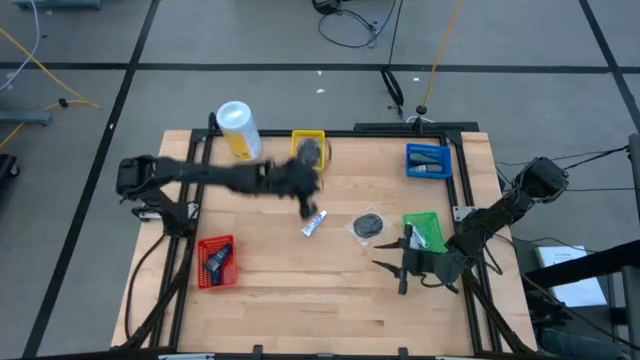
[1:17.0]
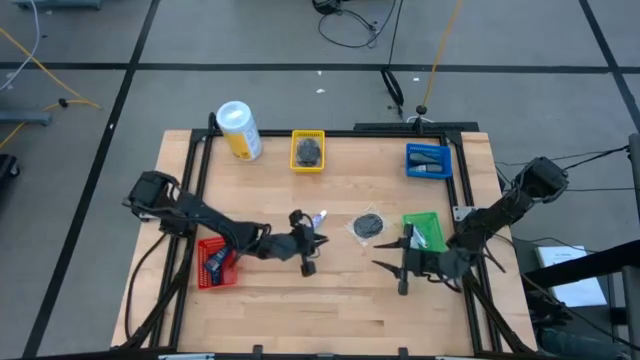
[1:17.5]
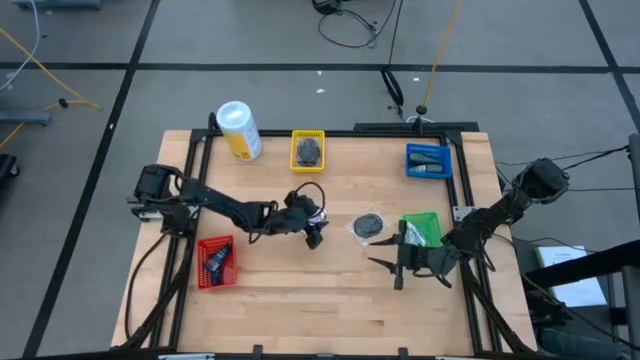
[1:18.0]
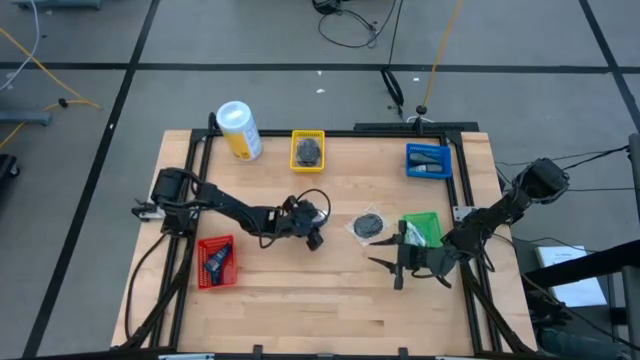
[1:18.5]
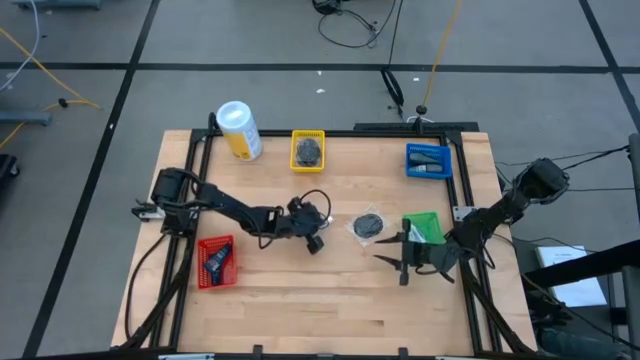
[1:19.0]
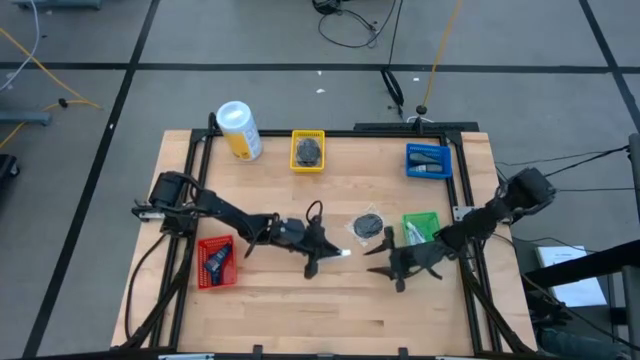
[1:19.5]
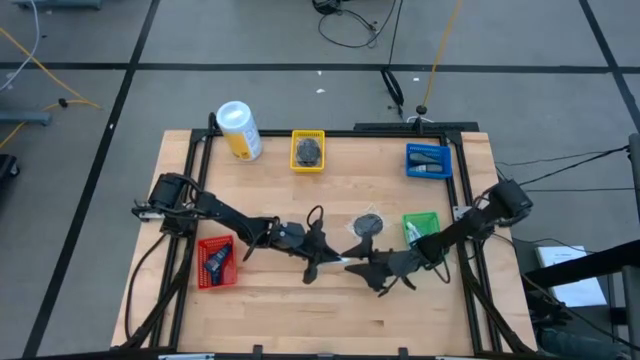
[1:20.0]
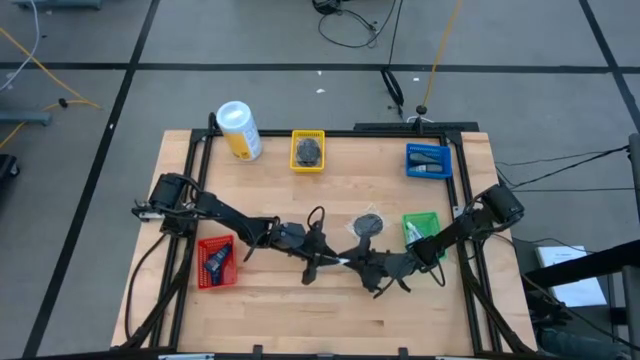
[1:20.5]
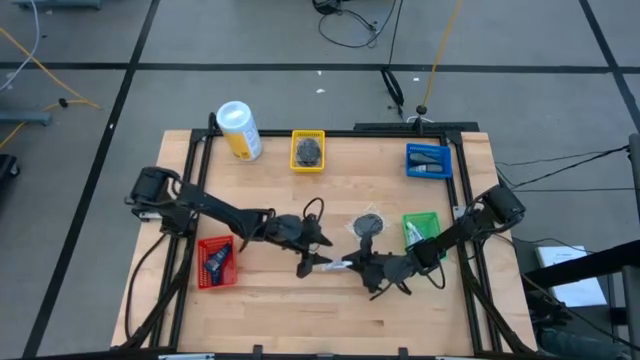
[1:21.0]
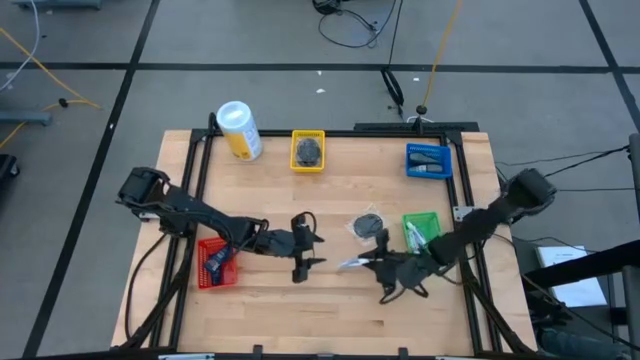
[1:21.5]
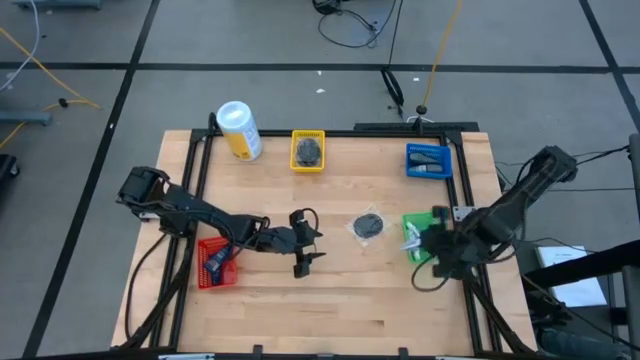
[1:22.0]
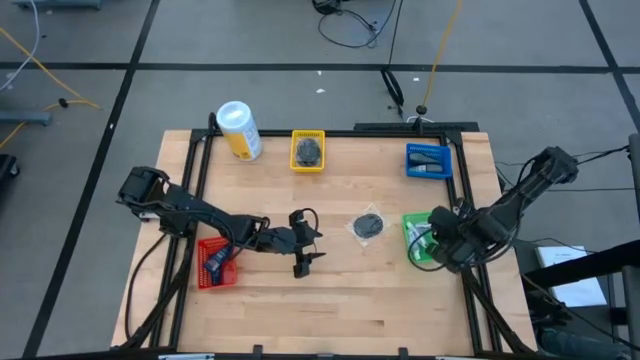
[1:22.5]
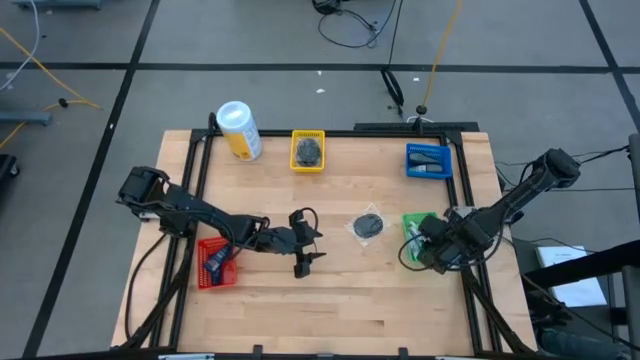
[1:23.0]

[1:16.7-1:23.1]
Task: Pick & Place Travel size toiletries
Put the toothpaste into the green bin

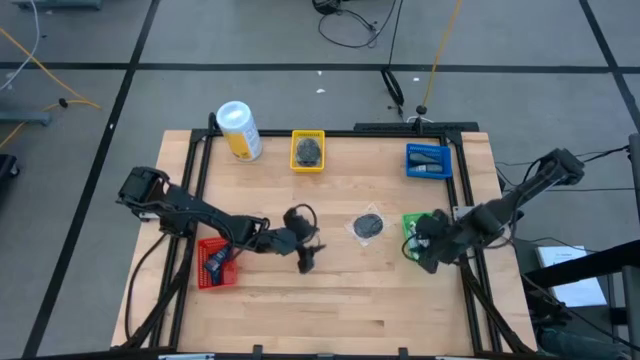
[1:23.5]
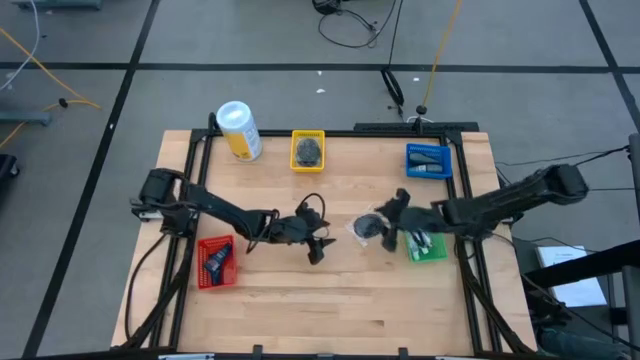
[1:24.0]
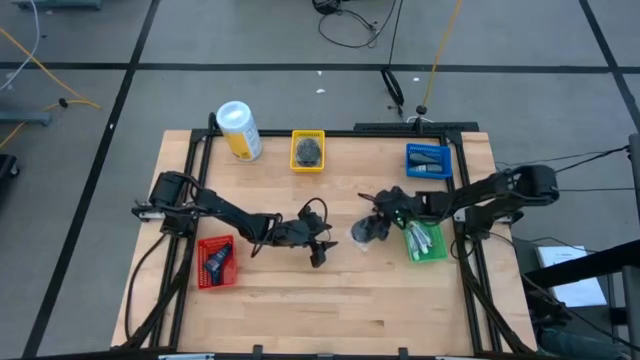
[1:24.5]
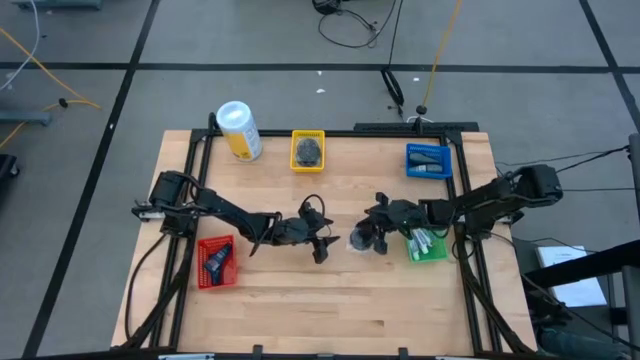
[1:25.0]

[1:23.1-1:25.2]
Put the hairbrush into the yellow bin

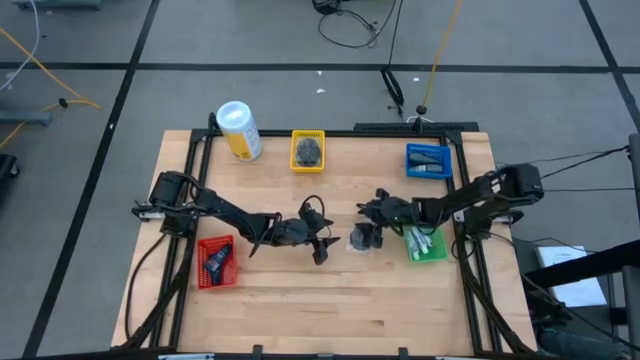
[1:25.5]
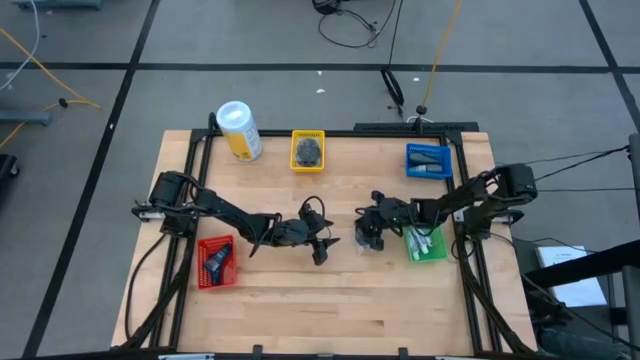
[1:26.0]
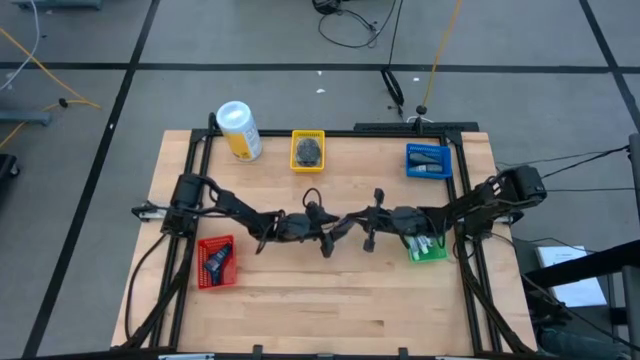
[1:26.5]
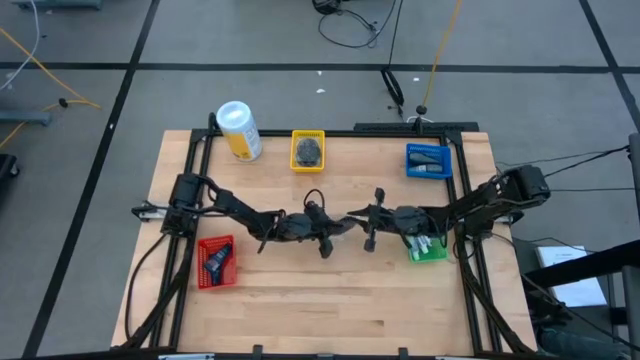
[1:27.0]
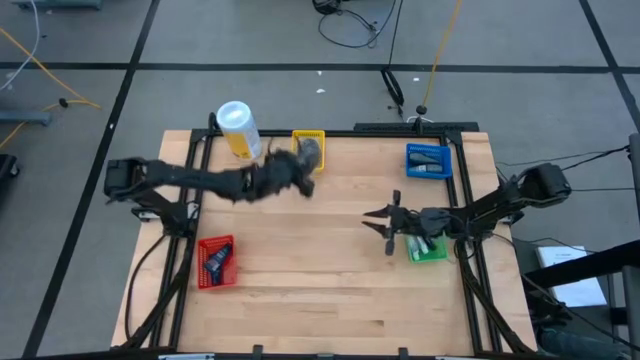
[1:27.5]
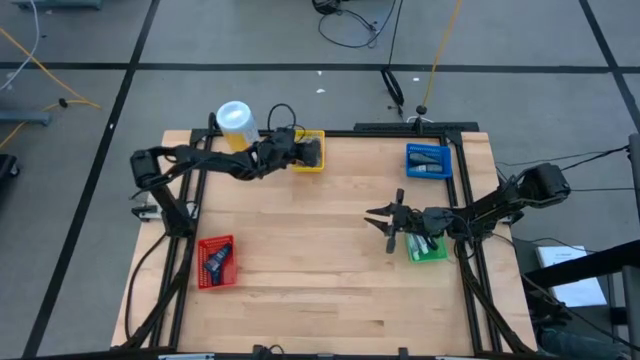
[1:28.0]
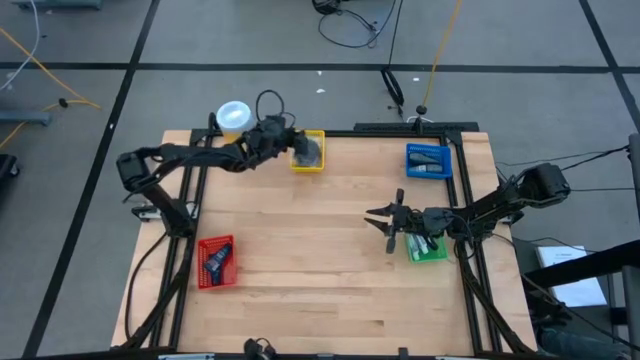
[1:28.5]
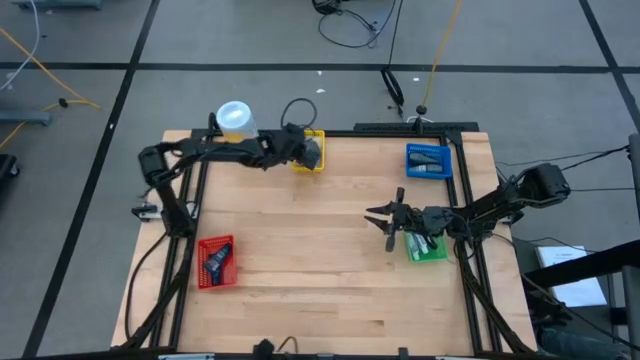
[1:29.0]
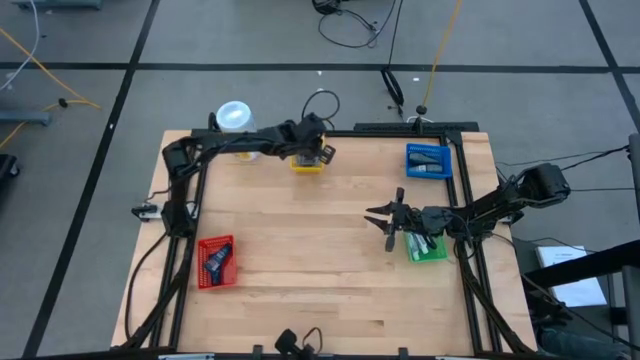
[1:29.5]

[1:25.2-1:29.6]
Put the hairbrush into the yellow bin

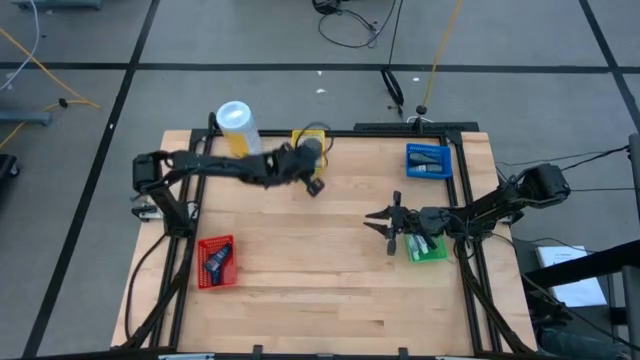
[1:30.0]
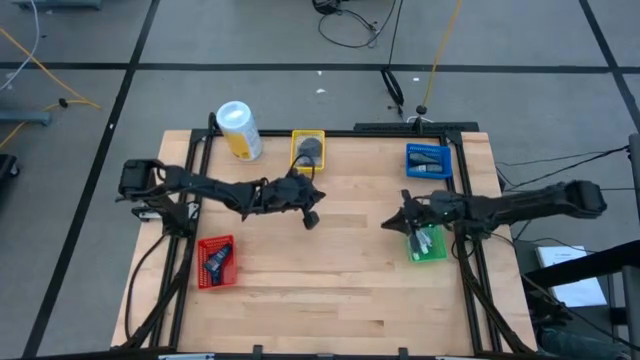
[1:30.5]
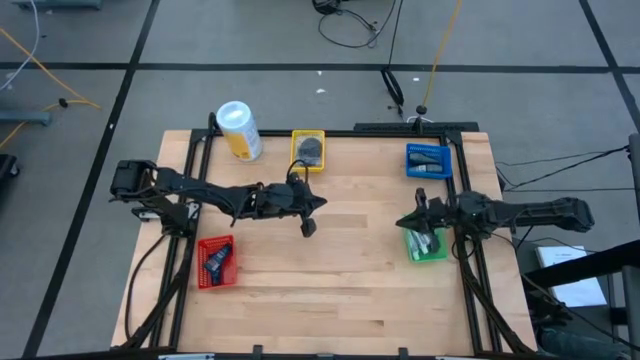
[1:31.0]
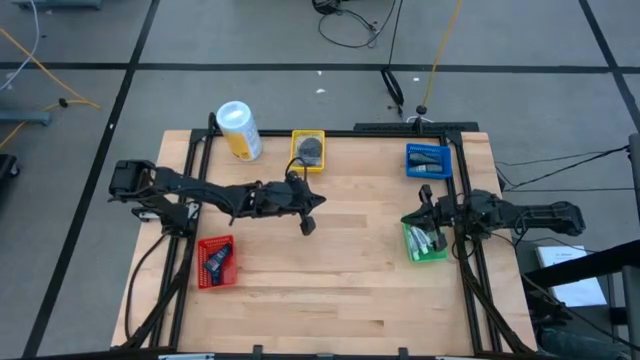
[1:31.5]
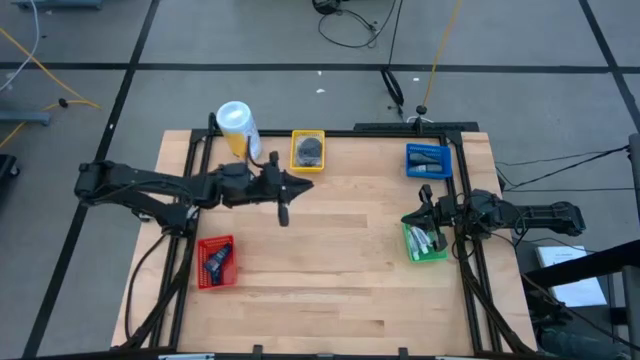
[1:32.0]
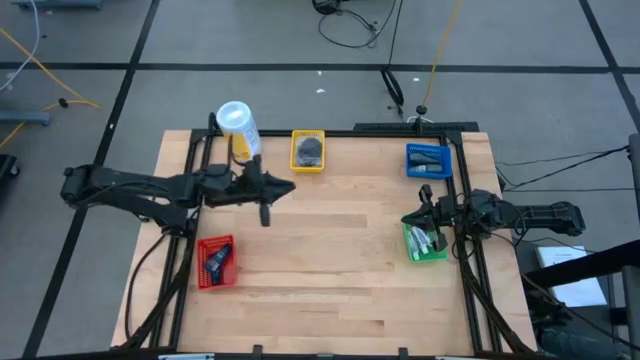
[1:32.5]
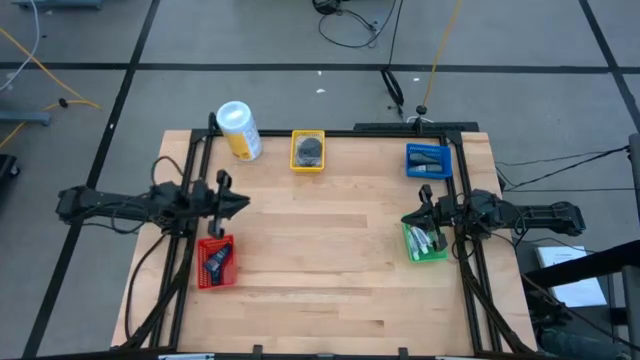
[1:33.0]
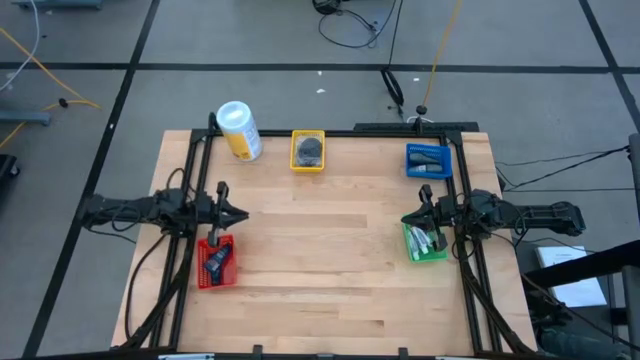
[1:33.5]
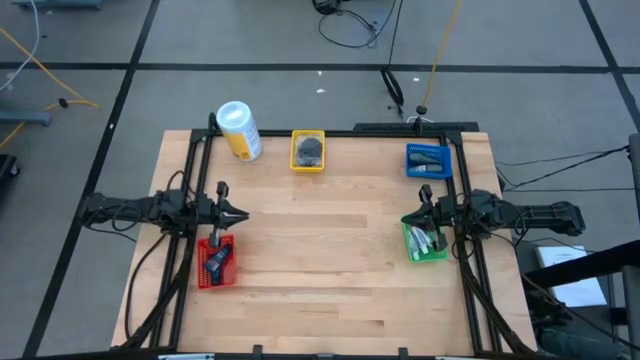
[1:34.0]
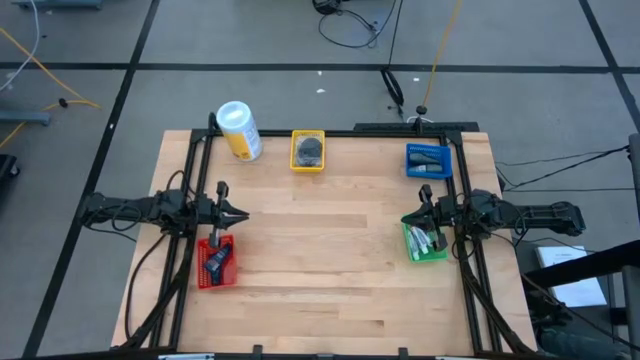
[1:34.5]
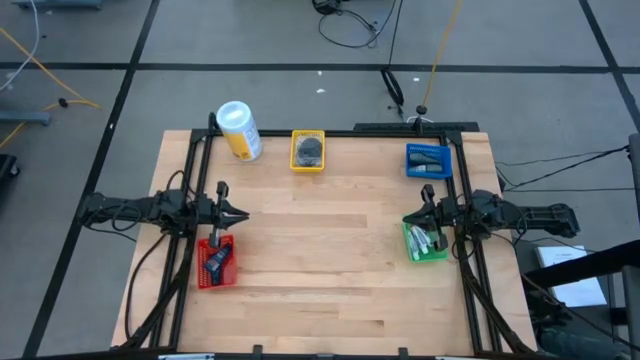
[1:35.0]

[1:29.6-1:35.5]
Return to Home Position

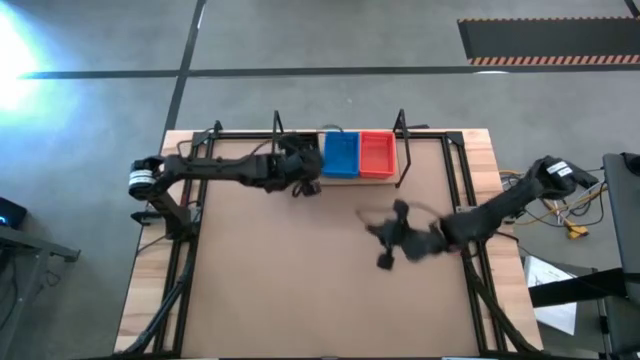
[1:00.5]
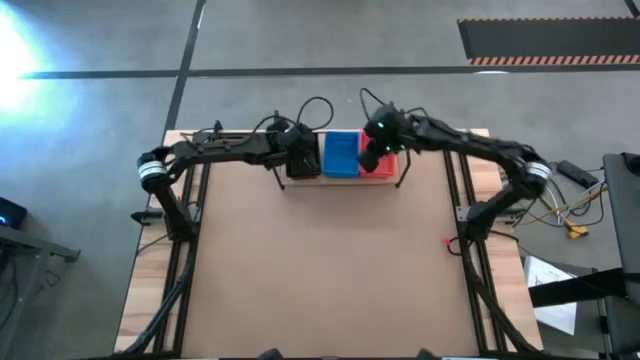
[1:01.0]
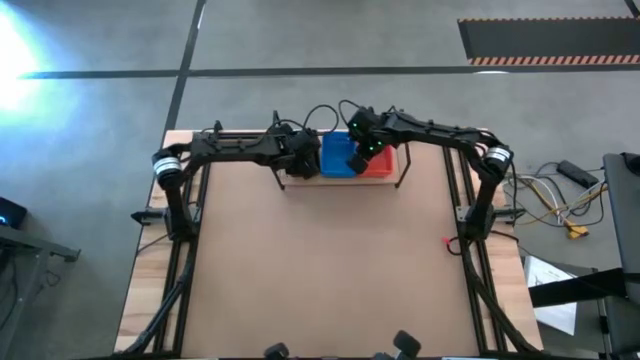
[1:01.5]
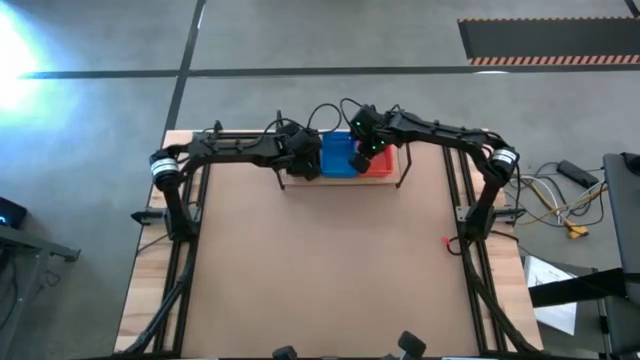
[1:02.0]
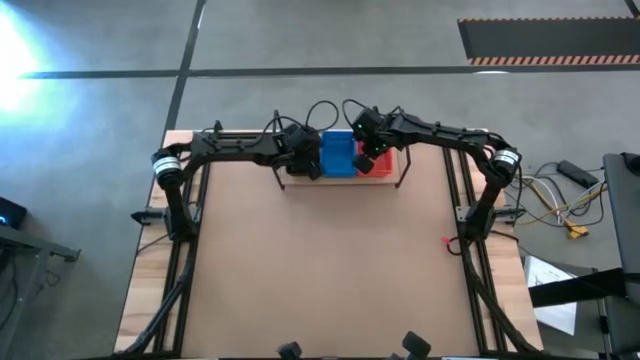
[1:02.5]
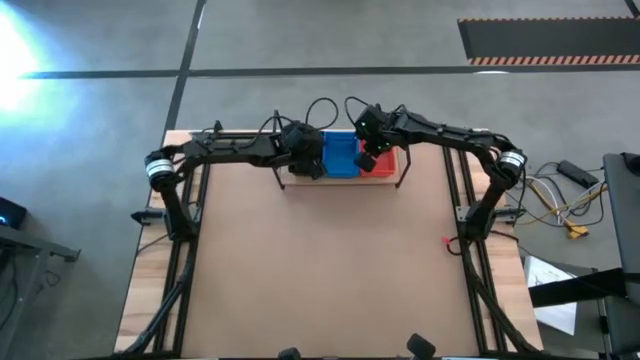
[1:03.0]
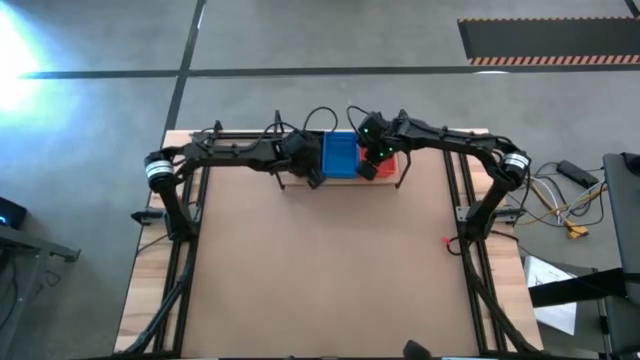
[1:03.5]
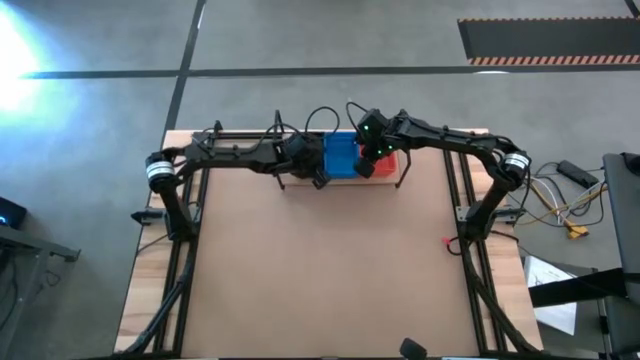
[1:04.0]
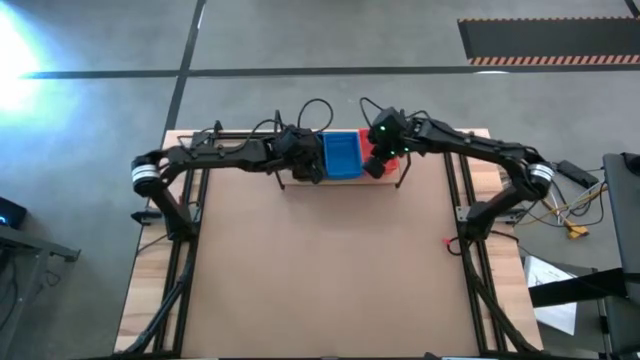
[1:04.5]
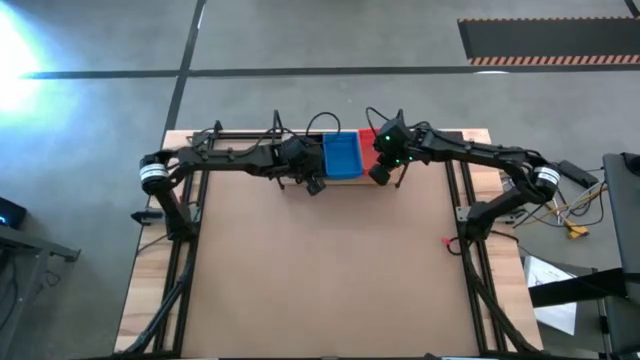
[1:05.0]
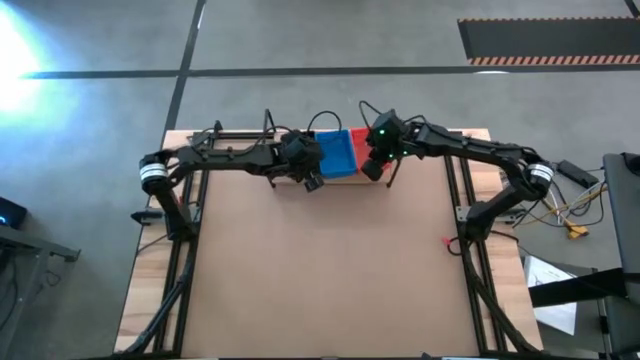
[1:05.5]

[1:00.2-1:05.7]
Task: Stack baskets on shelf by color
Adjust the bins on the shelf
